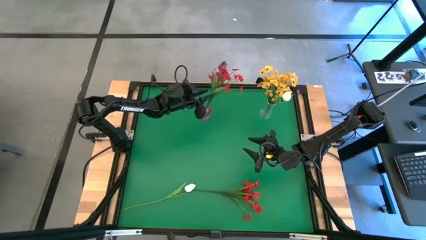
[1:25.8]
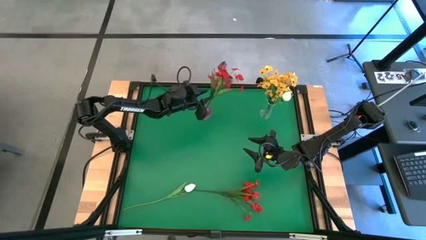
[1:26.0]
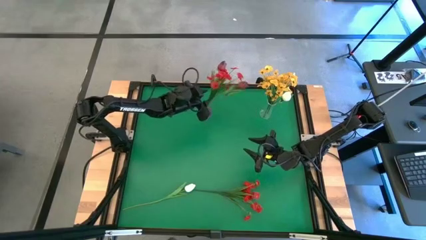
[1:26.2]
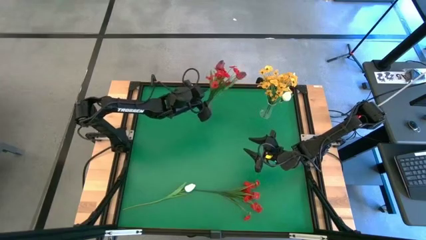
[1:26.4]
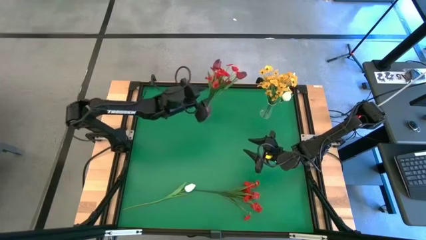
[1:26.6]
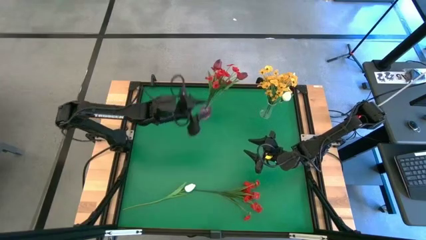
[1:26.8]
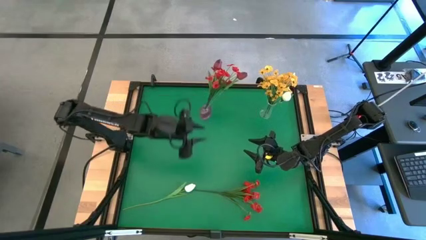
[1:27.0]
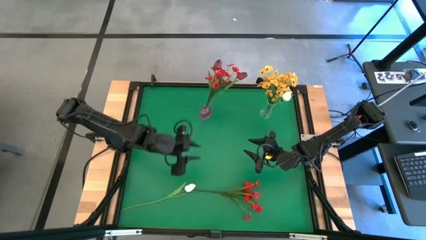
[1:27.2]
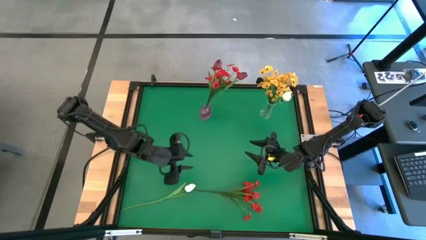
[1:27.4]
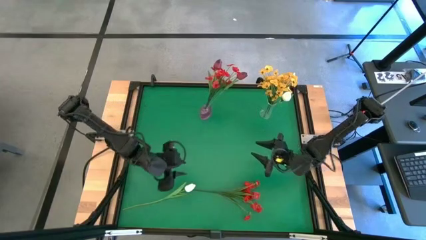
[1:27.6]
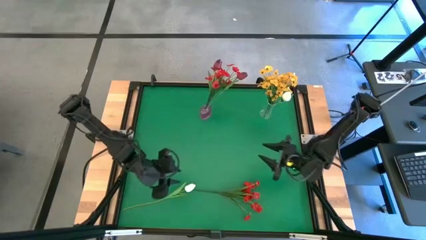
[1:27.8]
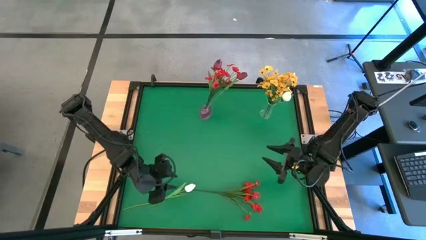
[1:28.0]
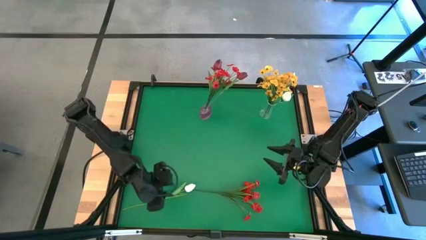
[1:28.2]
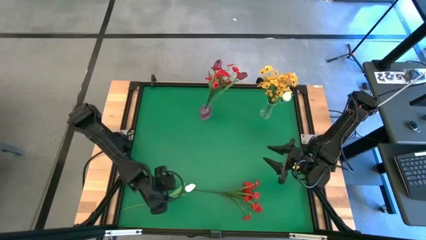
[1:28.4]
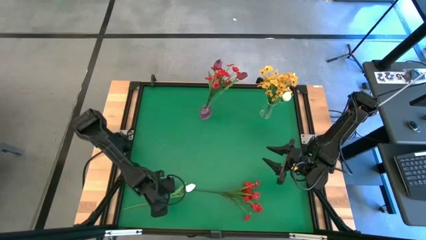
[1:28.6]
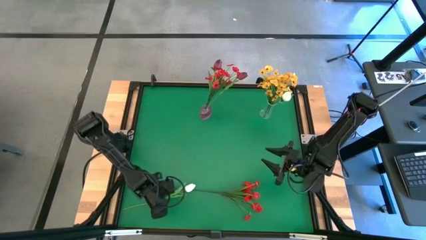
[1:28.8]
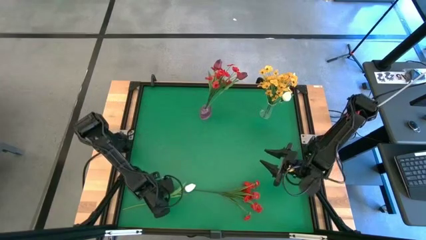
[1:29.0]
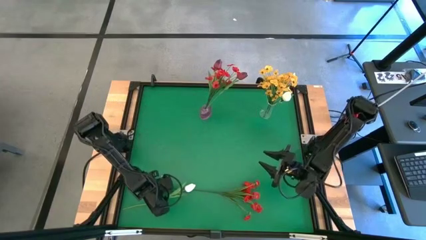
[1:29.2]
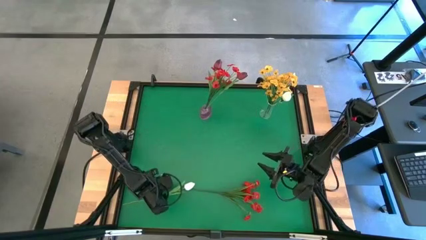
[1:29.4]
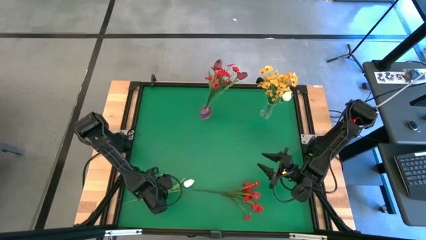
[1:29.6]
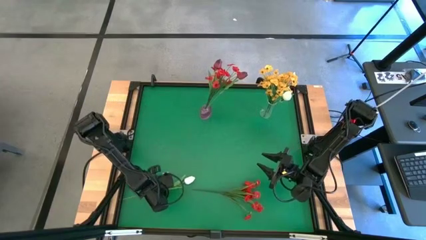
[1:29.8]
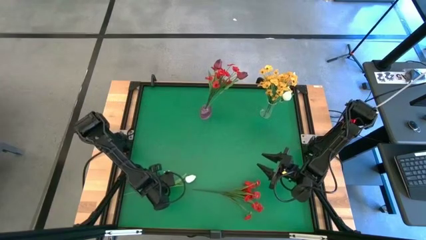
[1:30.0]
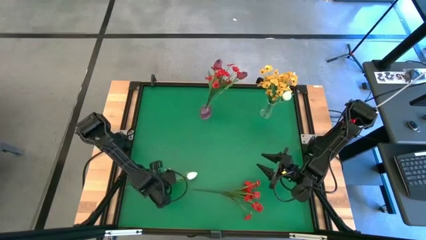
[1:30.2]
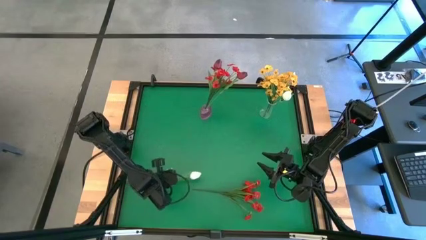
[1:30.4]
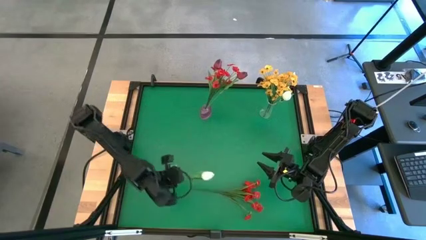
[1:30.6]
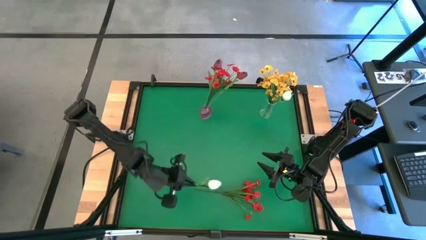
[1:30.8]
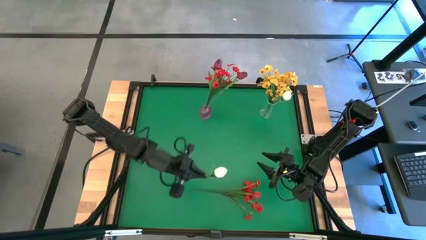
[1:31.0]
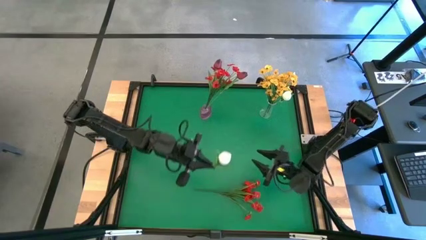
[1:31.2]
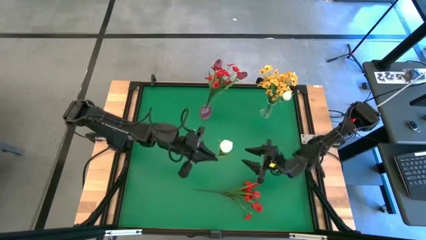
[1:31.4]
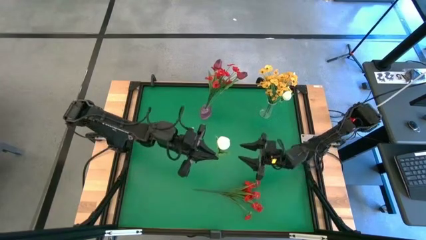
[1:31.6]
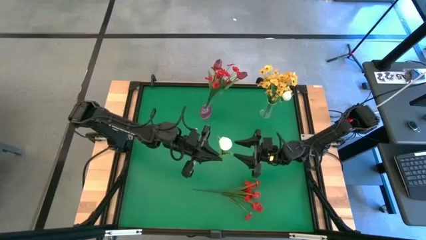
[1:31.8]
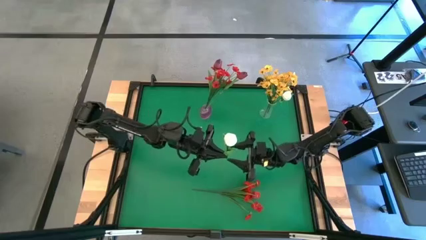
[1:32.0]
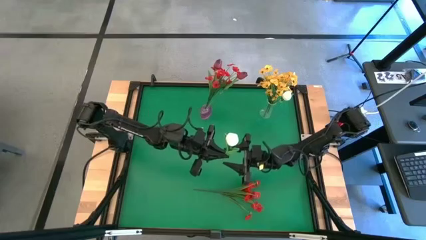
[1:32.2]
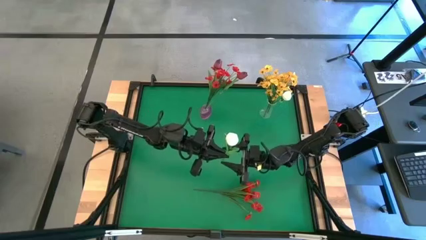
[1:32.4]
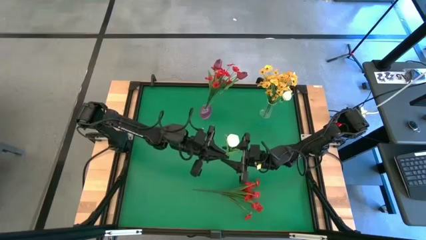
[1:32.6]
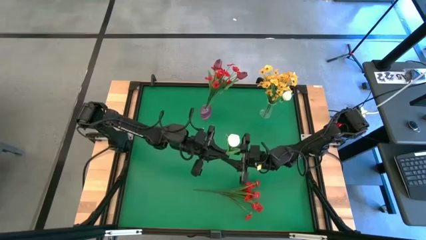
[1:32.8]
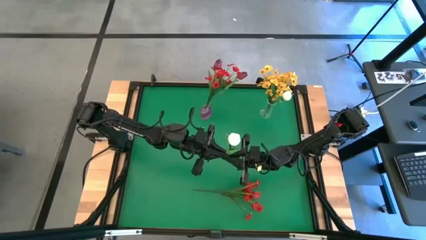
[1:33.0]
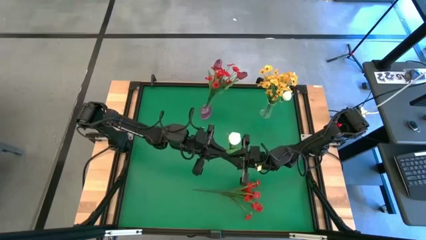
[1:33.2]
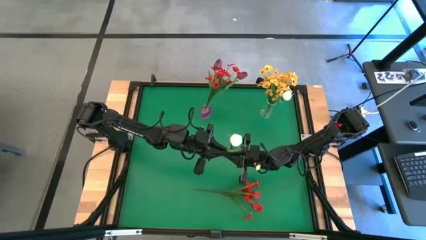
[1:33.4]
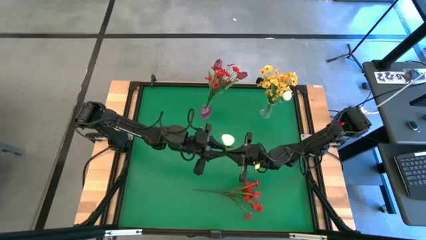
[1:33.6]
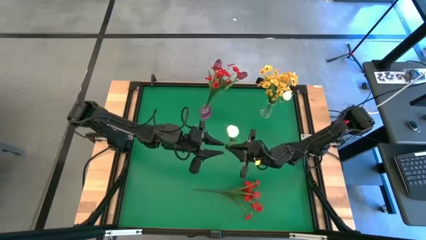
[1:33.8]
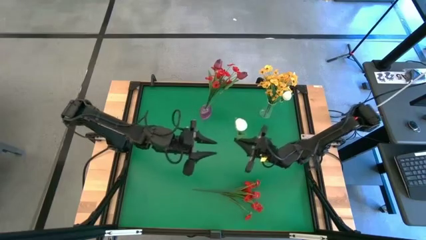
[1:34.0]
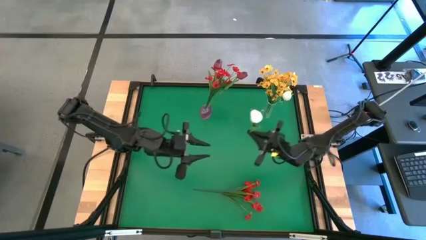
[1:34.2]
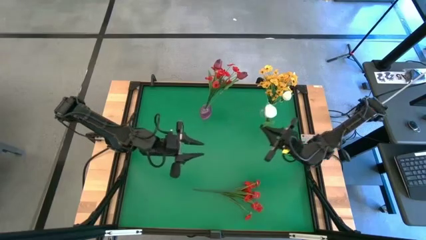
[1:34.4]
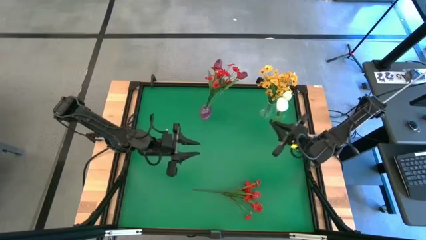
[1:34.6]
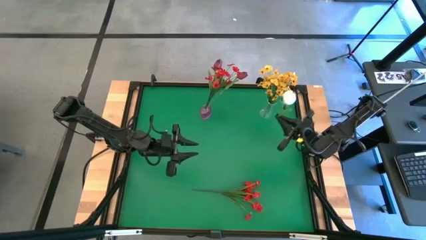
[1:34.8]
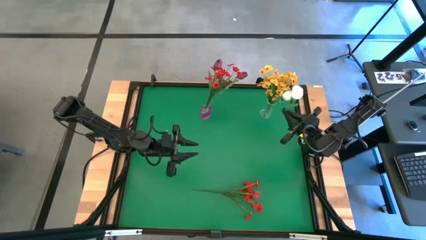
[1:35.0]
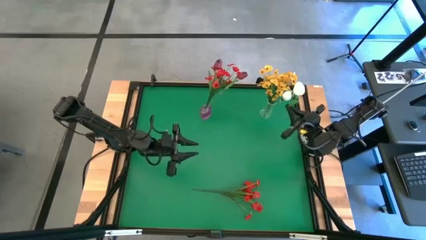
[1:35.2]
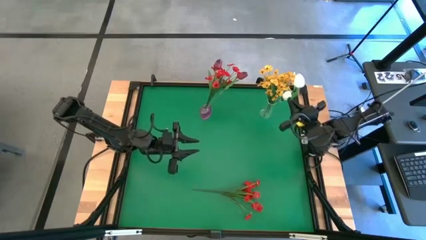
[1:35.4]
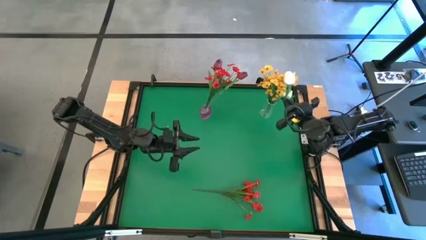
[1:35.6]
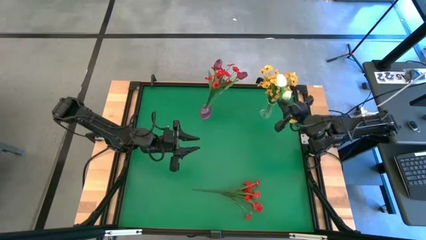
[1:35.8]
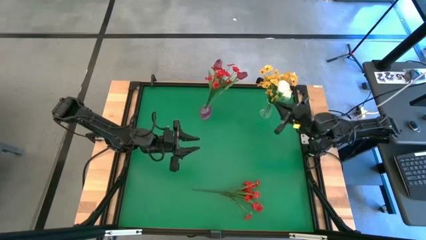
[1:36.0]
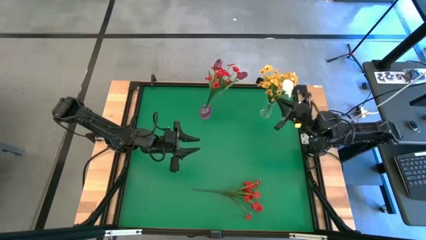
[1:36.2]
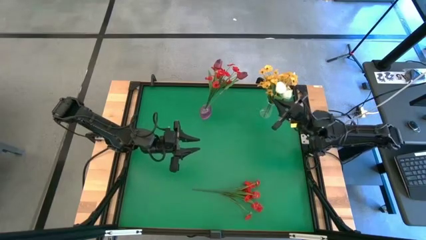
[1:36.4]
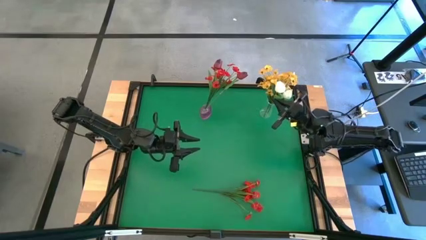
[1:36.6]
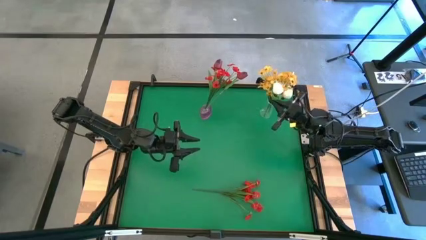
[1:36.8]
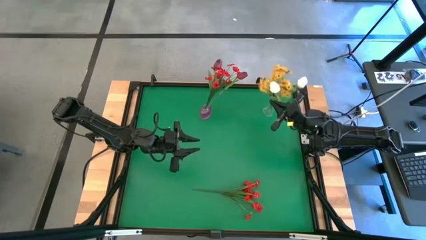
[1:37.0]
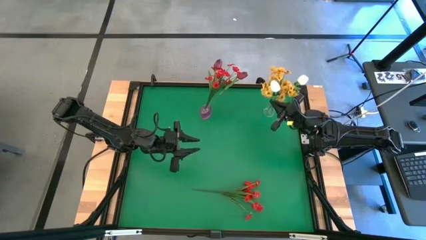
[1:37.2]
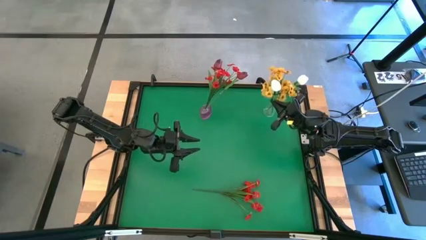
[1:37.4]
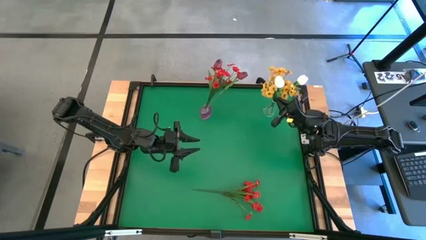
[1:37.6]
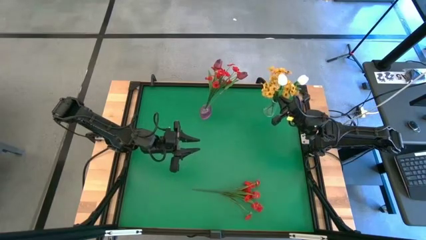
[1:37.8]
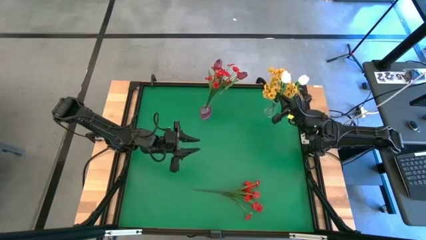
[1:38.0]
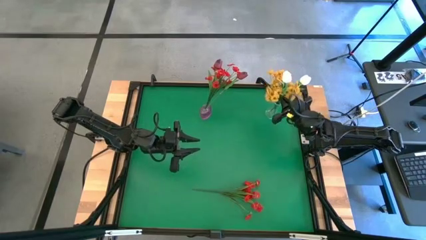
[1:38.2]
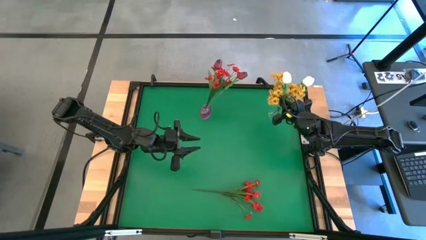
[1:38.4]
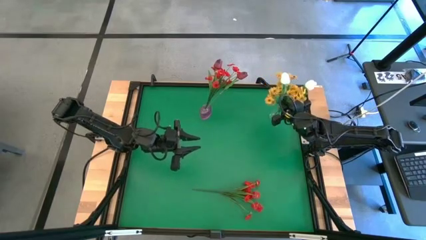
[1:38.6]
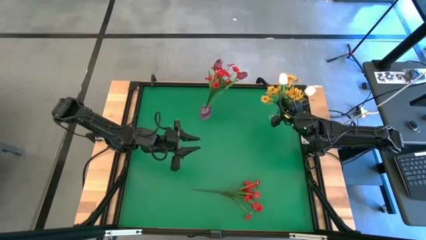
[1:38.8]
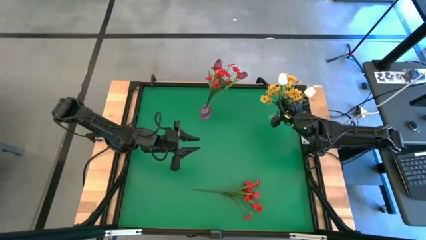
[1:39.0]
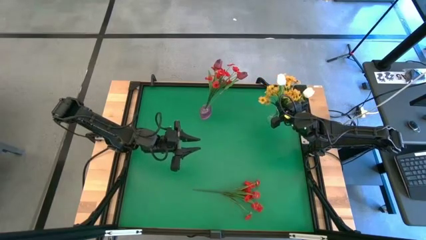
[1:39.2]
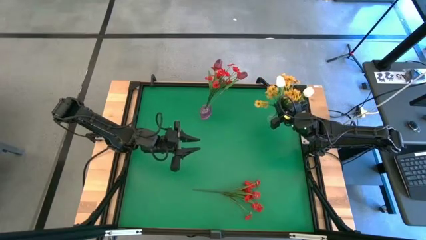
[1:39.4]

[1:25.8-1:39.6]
Task: Sort flowers into vase by color
Put the white flower into the transparent vase
